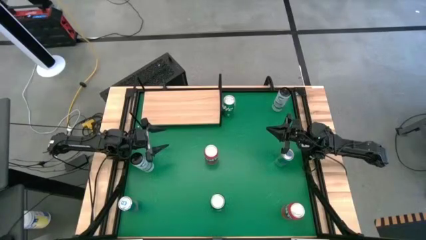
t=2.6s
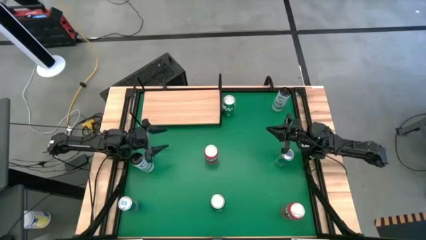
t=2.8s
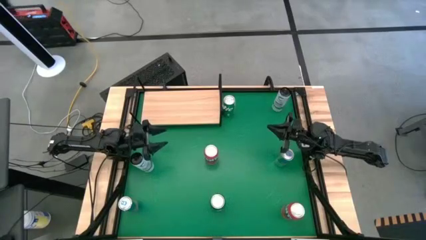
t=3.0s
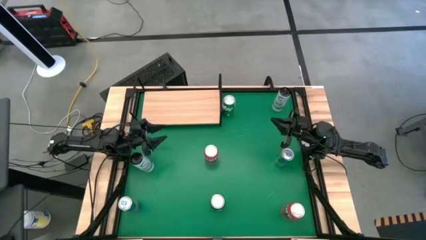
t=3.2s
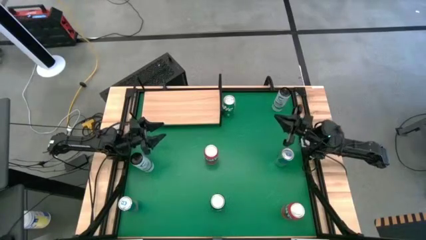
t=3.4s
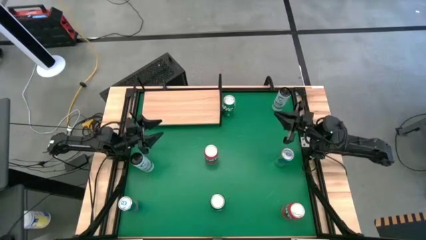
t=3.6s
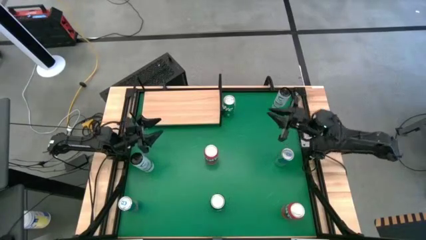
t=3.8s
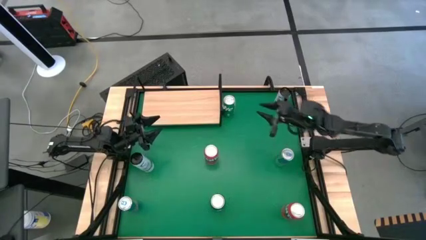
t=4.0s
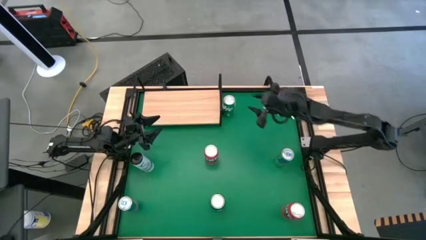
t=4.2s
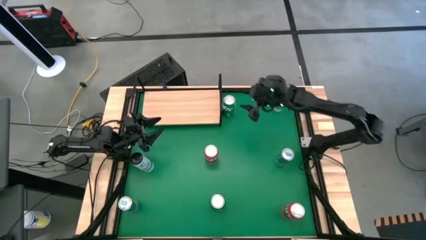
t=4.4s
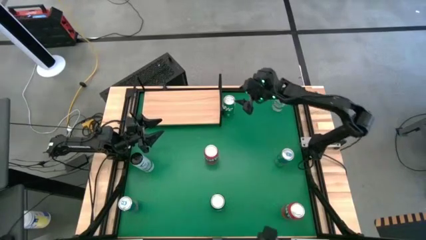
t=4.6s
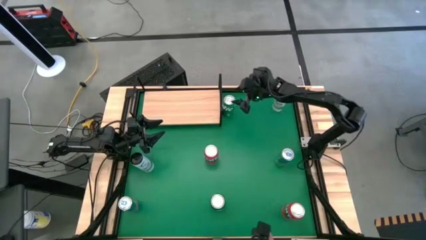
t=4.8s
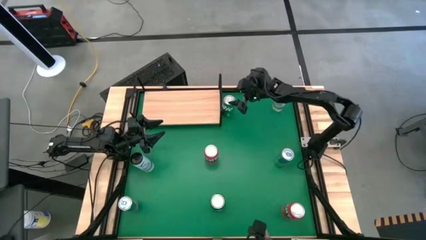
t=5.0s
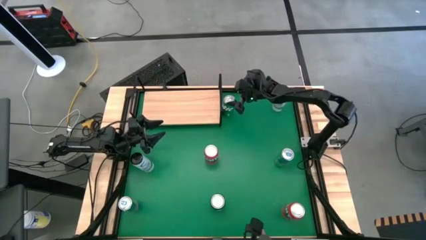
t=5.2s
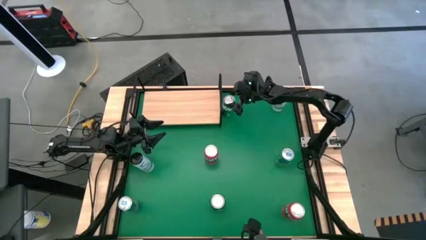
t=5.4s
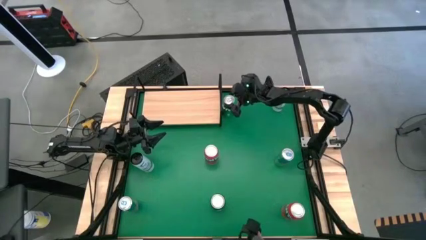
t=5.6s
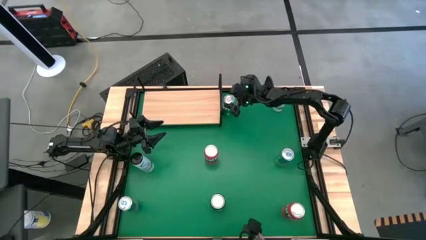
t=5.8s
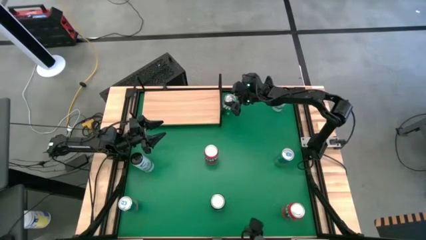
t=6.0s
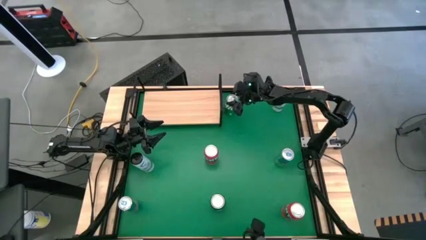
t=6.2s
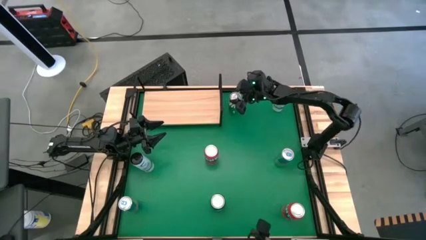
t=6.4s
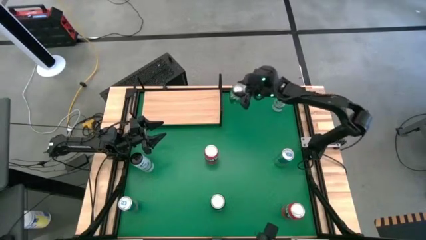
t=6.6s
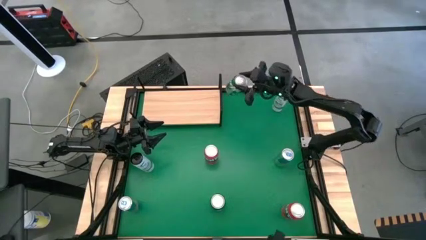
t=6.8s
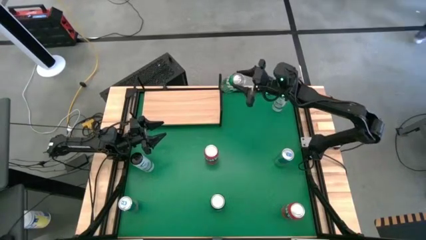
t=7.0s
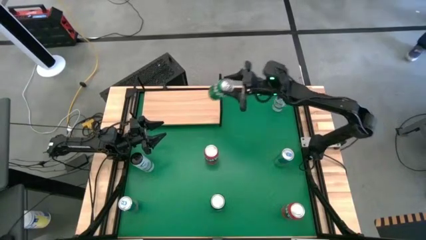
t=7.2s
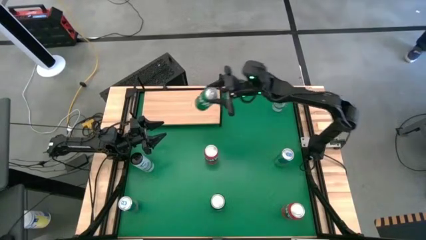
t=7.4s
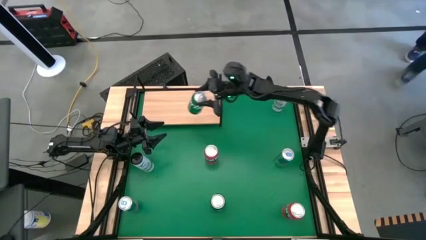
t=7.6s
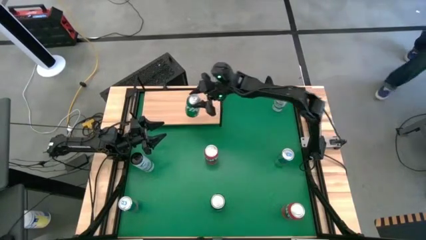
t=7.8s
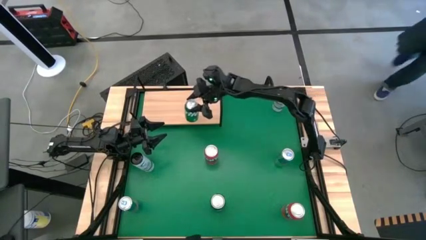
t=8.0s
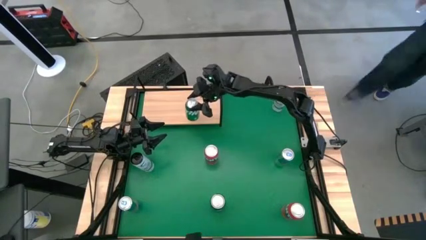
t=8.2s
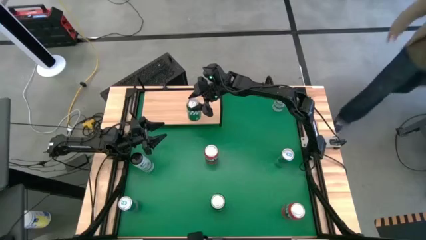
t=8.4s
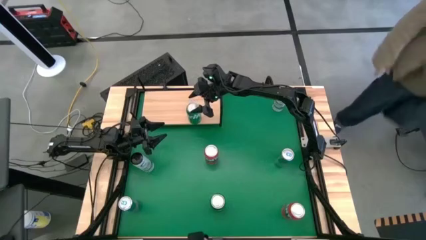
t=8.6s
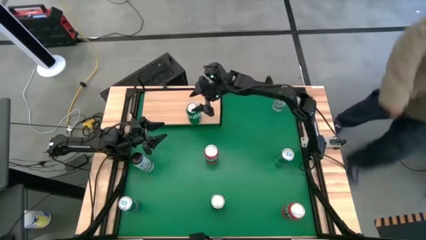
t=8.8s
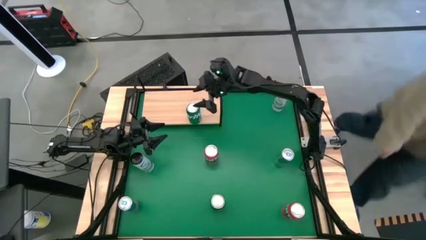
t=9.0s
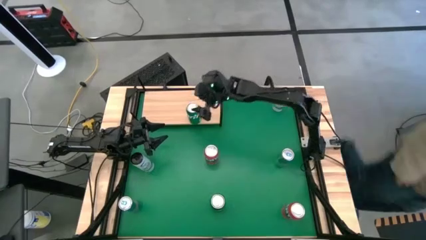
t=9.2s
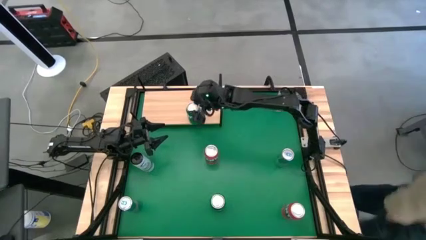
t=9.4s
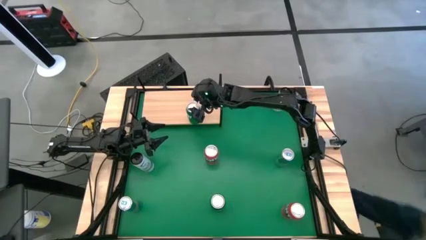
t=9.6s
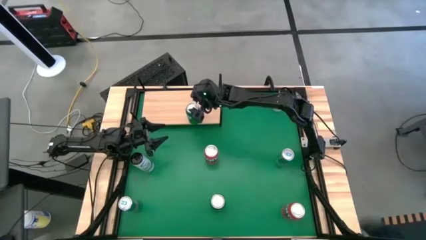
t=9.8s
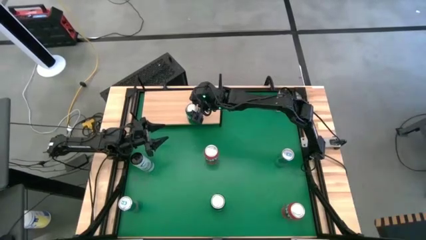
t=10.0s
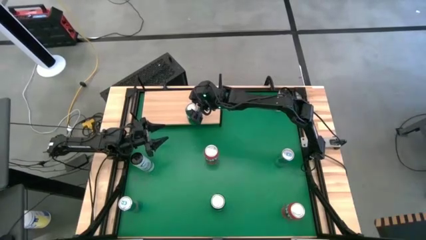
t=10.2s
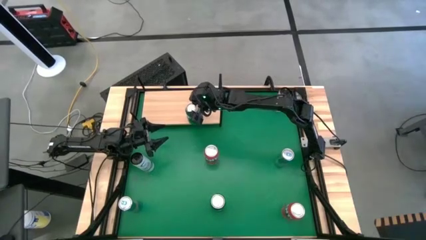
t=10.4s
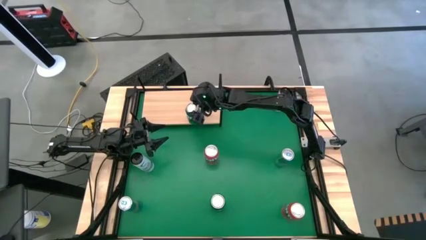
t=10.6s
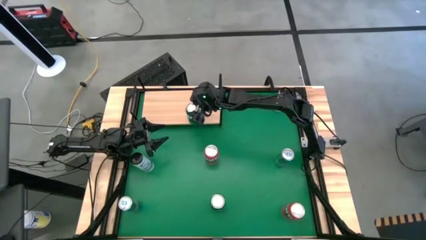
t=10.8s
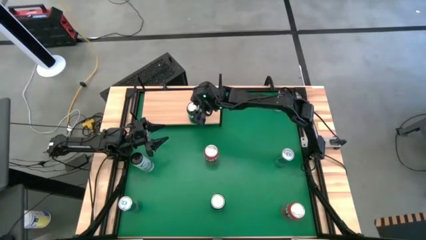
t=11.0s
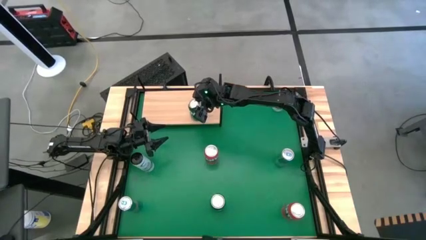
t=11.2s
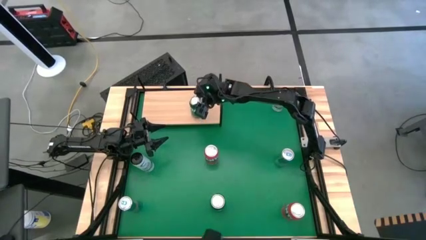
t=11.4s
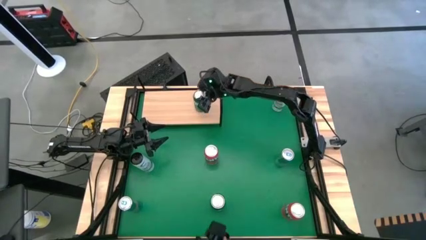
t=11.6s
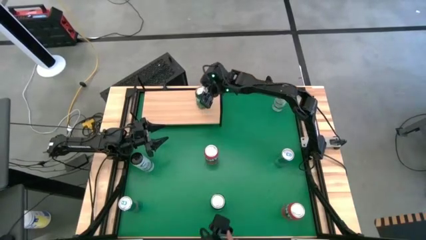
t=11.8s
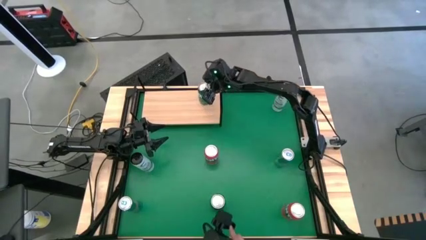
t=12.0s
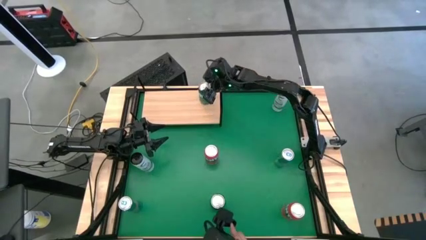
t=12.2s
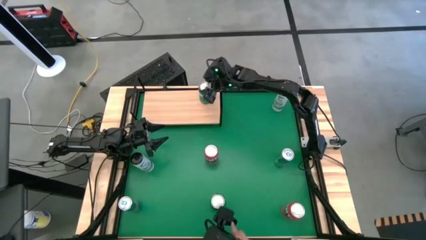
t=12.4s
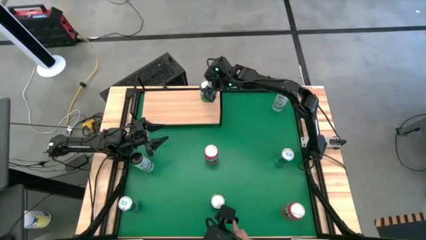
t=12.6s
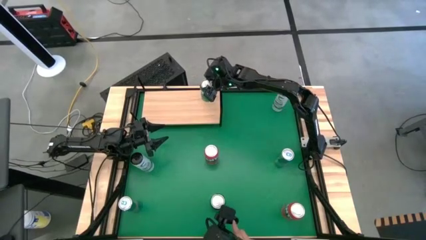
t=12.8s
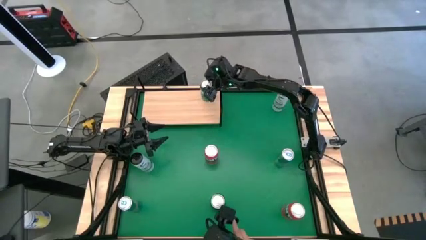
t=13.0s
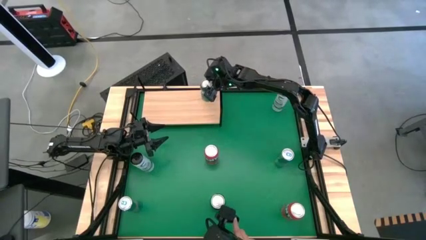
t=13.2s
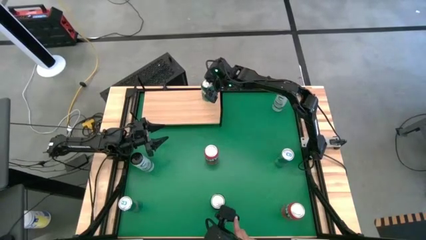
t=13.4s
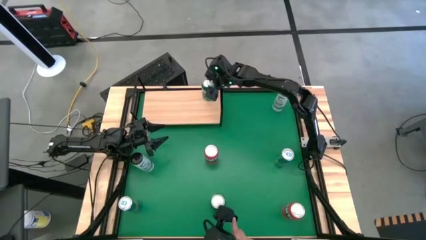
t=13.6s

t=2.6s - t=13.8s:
Task: Place canned beverage on shelf
Put the top green soda can on the shelf

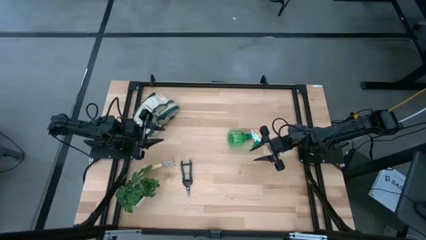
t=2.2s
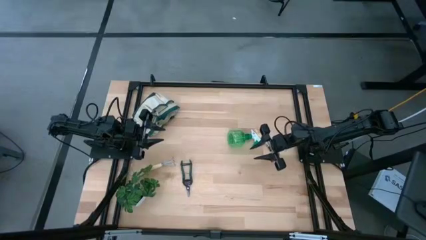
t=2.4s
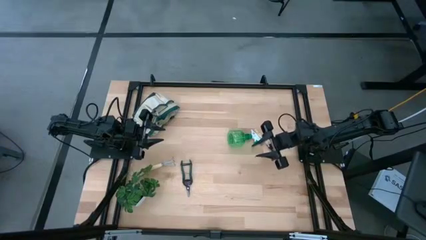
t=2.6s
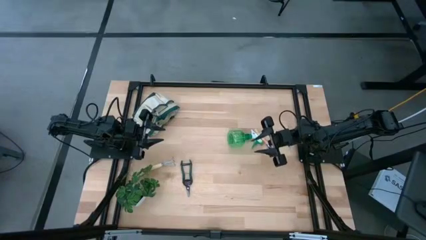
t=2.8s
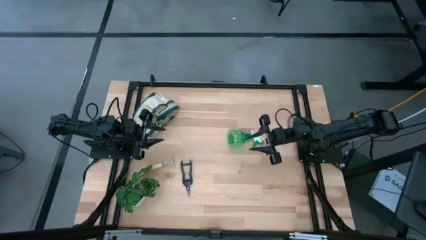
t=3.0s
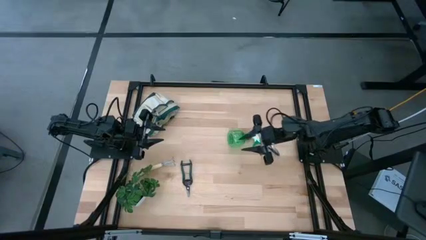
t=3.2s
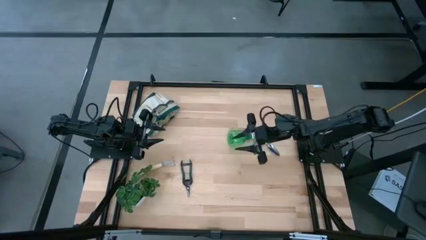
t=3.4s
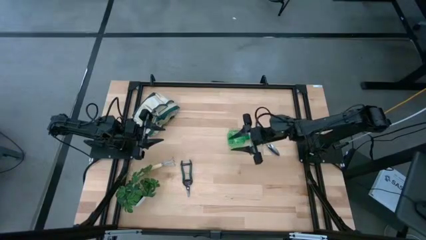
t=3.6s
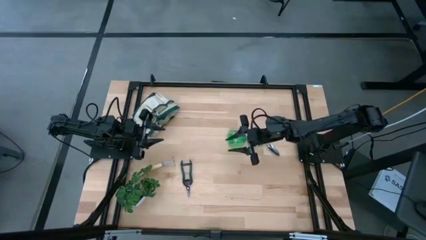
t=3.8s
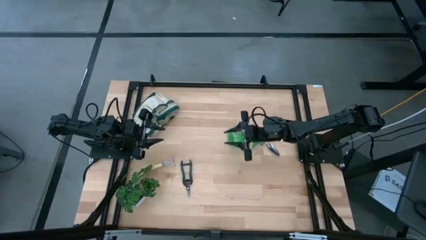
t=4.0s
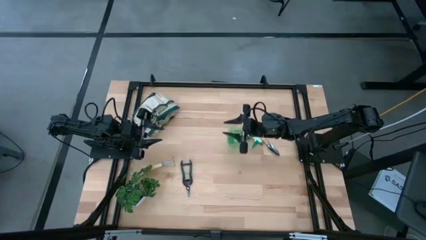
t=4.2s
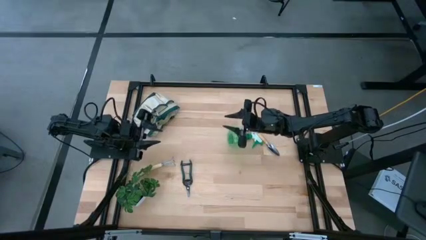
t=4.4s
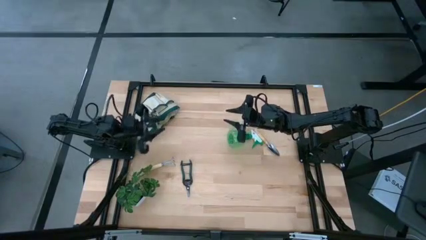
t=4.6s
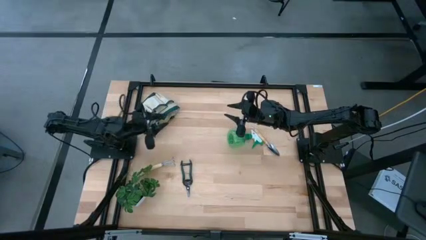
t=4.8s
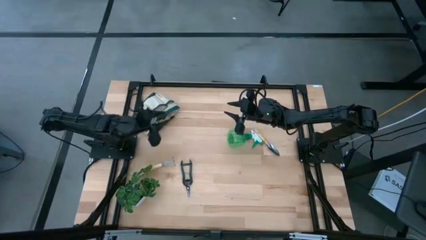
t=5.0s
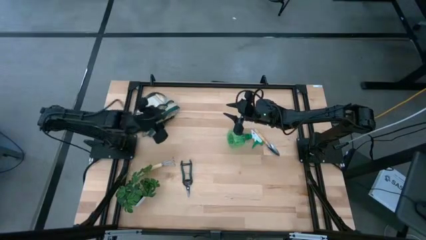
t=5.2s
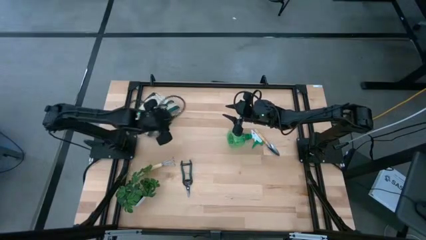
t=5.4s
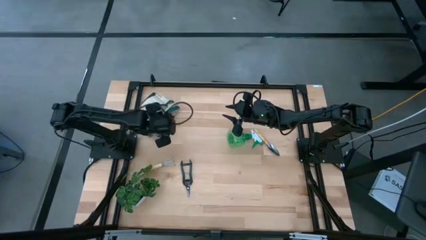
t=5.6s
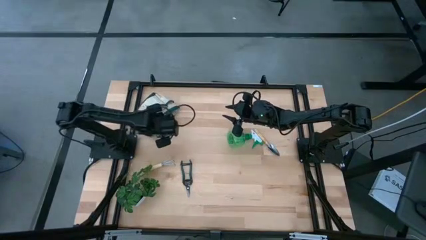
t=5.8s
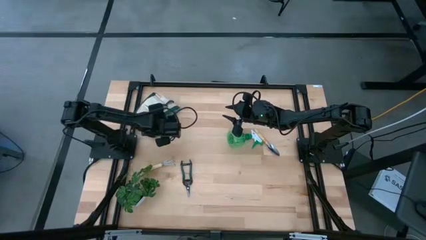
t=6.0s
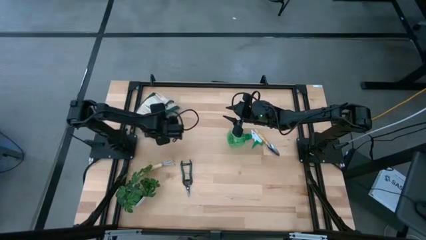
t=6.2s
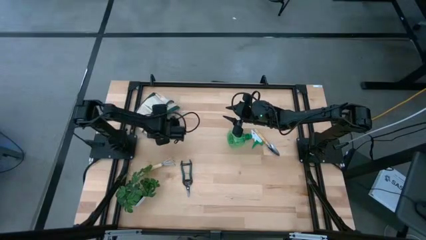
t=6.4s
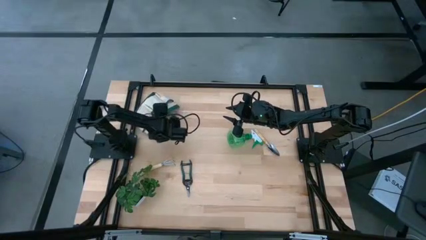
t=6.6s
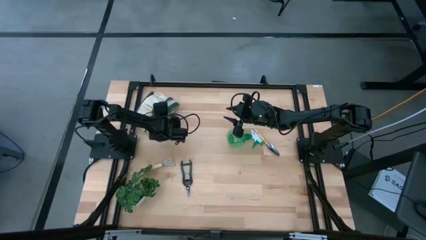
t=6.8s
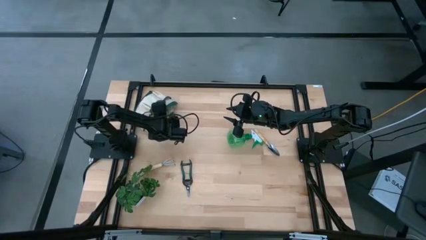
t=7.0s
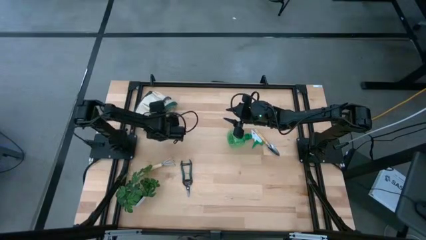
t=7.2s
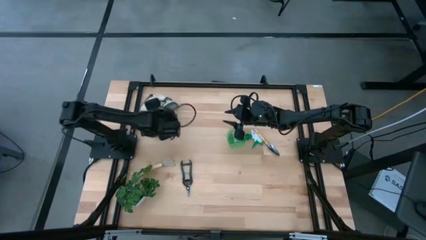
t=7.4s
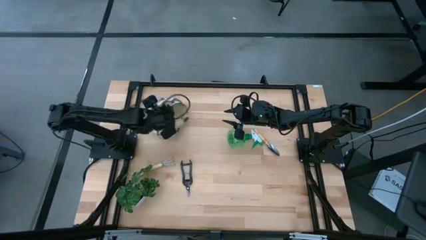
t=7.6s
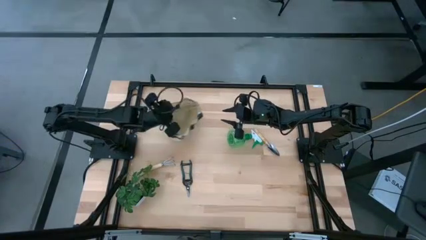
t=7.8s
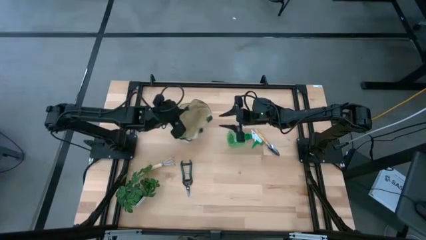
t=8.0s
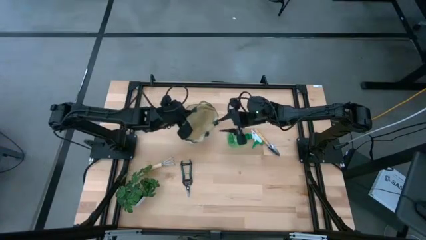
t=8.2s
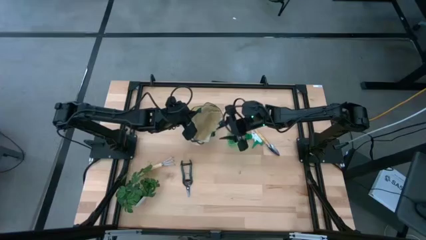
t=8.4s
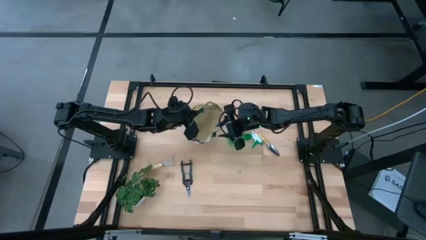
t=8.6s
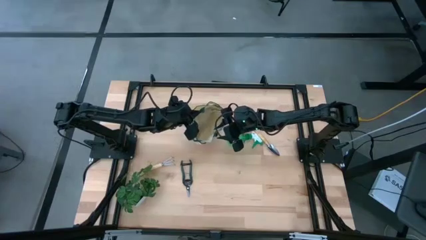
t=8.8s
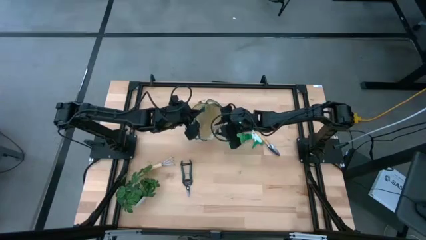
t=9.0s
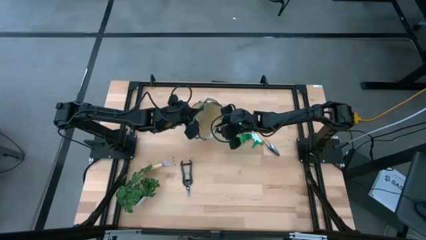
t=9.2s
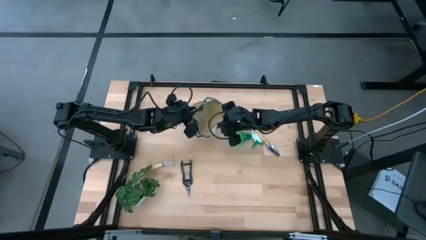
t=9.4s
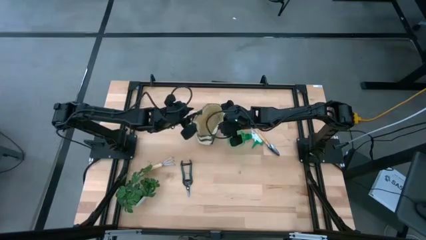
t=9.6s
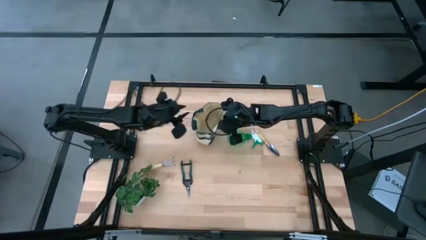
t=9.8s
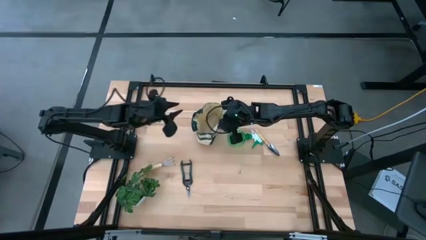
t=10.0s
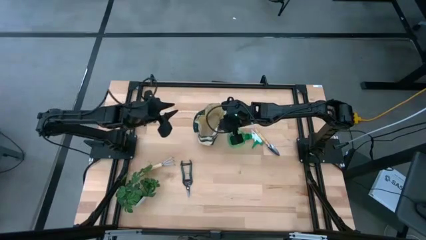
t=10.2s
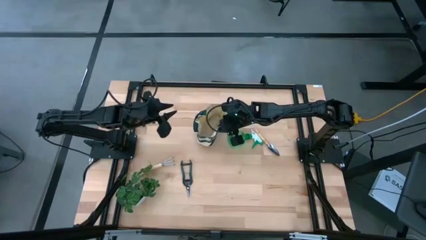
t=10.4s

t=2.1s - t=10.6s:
Task: Pick & Place Garden tools in Gardening bag
Prepare the light brown gardening bag
